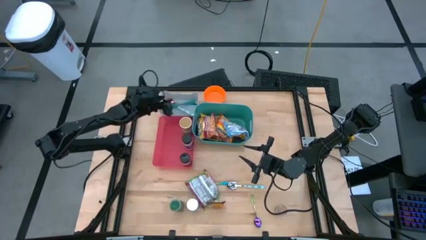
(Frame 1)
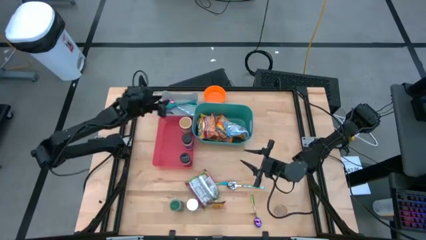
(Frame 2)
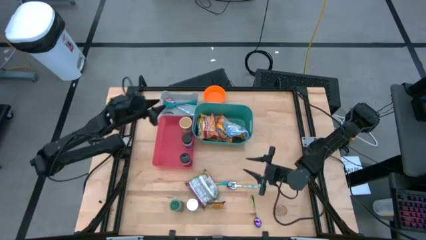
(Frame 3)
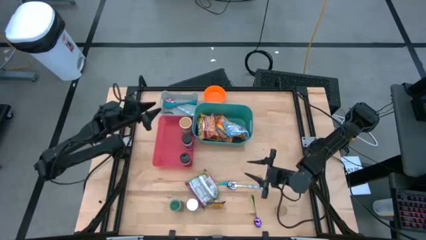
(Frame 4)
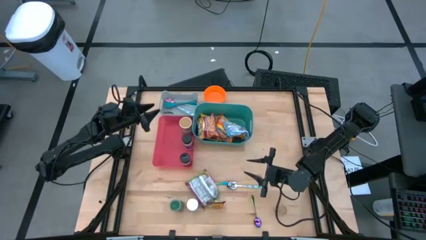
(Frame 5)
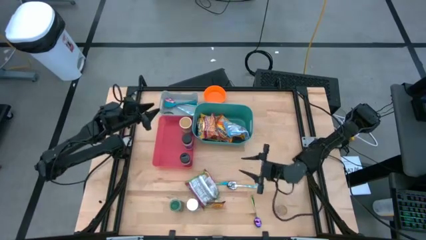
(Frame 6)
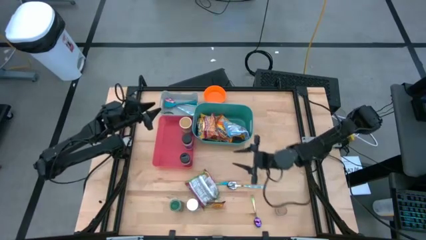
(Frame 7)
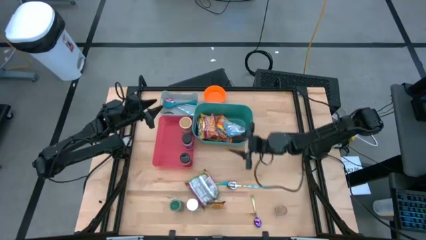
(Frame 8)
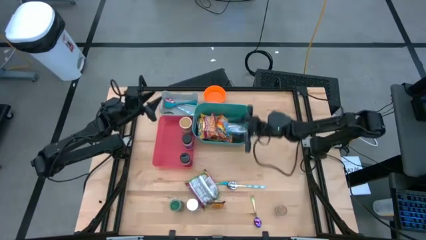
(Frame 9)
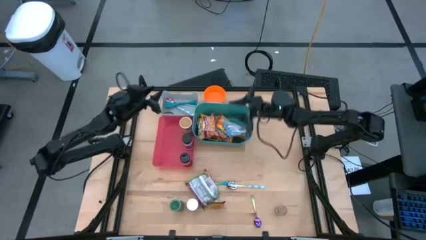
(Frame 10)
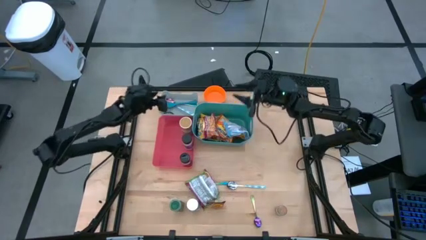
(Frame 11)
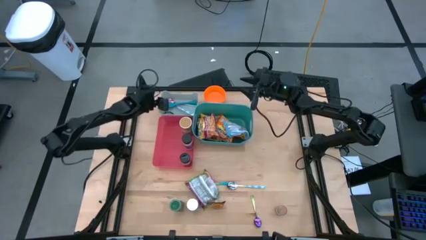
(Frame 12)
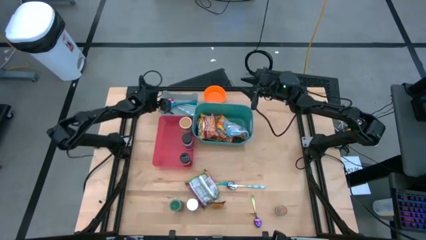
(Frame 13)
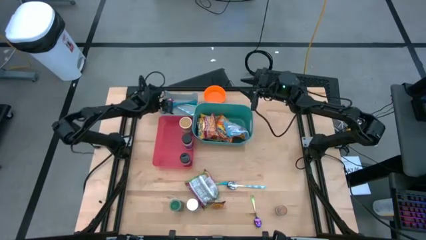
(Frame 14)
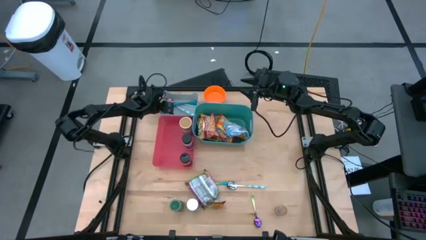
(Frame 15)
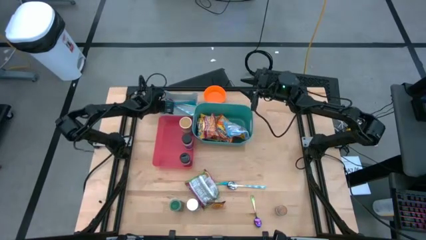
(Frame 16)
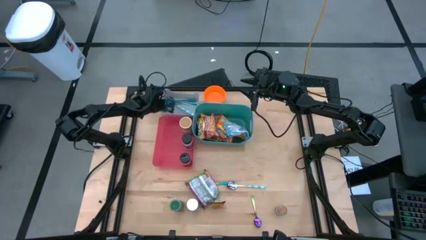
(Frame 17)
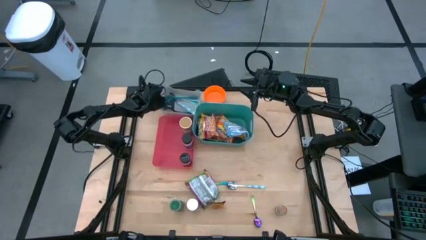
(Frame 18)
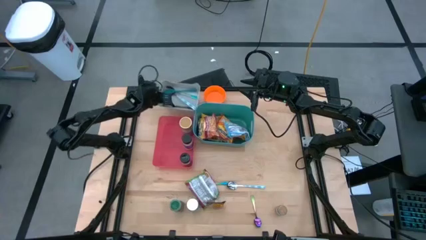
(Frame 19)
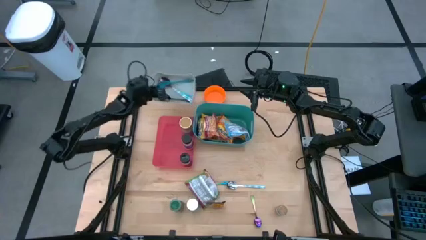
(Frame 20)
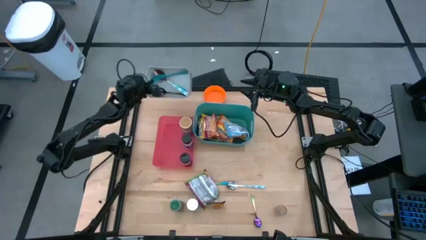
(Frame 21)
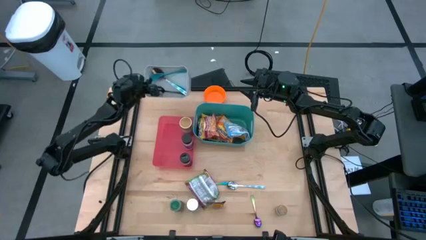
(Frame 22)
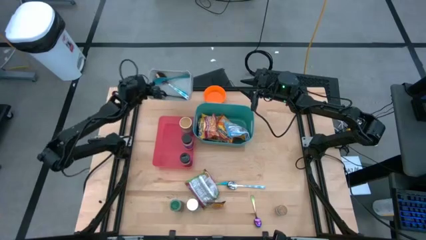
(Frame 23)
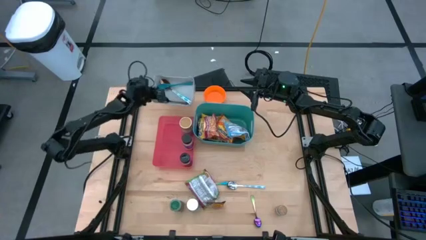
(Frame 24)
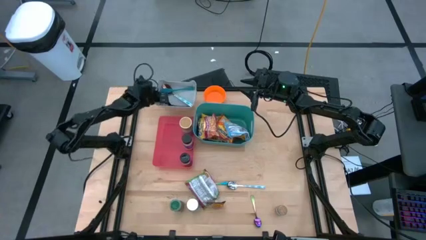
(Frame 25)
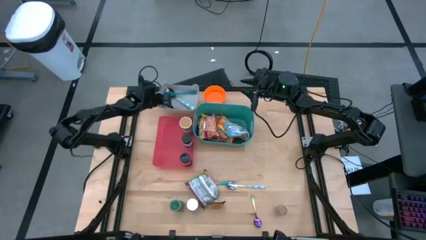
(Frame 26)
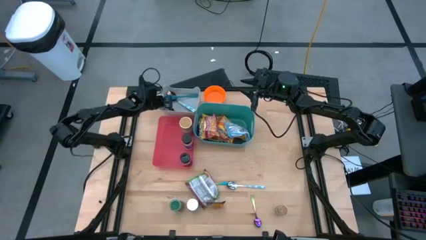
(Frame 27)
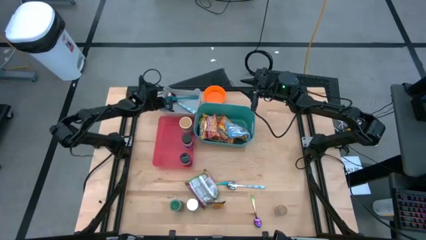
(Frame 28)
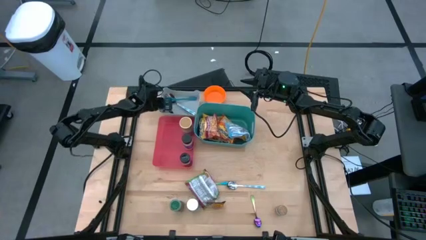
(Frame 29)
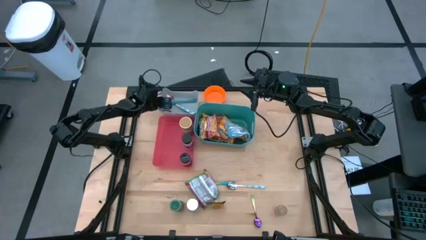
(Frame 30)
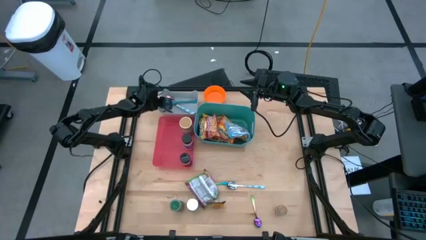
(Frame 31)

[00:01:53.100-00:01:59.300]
Task: Pick & Place Food Item
Adjust the gray bin

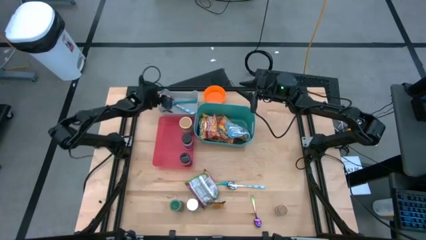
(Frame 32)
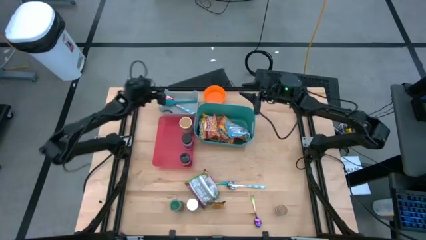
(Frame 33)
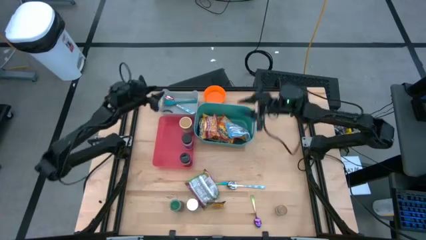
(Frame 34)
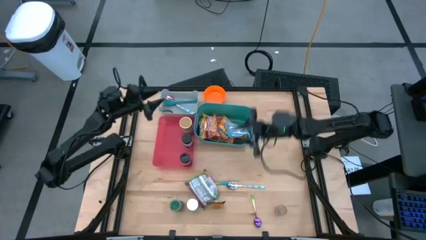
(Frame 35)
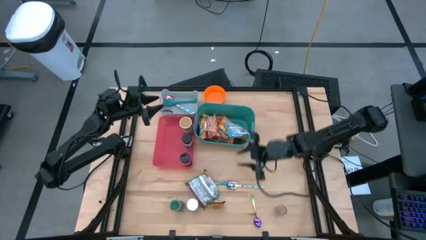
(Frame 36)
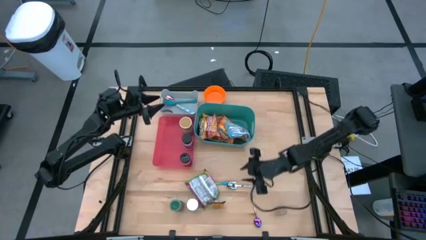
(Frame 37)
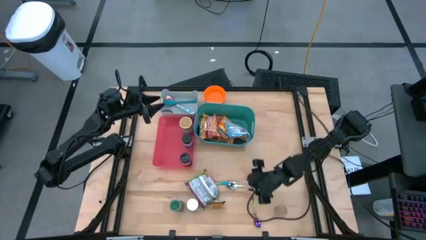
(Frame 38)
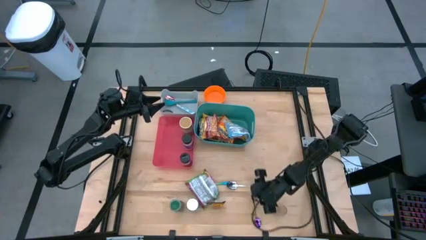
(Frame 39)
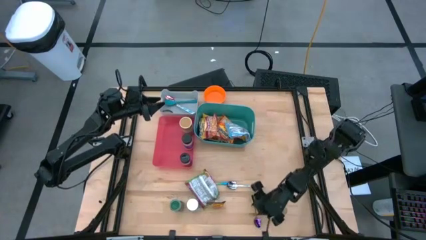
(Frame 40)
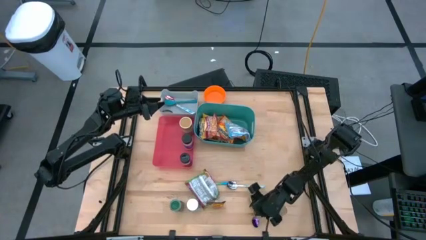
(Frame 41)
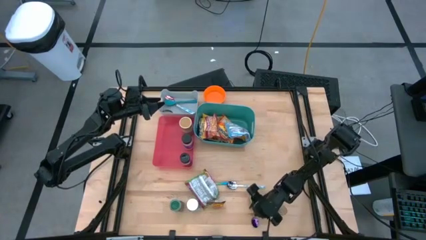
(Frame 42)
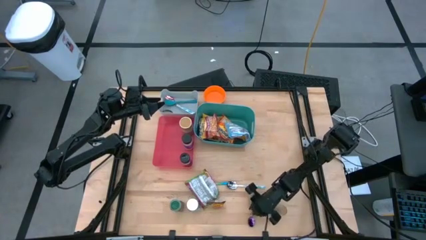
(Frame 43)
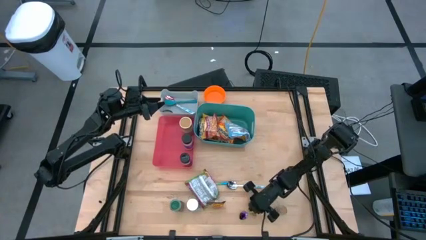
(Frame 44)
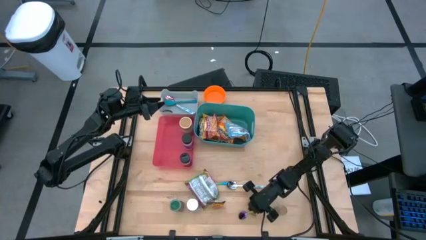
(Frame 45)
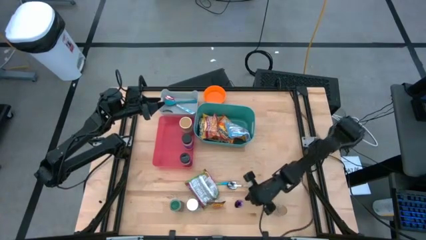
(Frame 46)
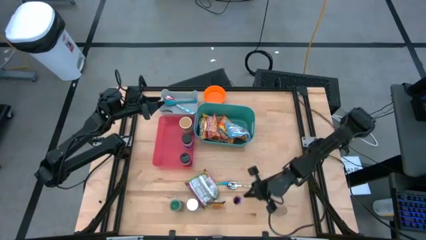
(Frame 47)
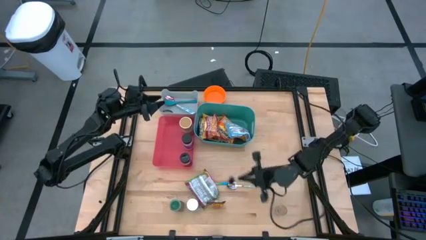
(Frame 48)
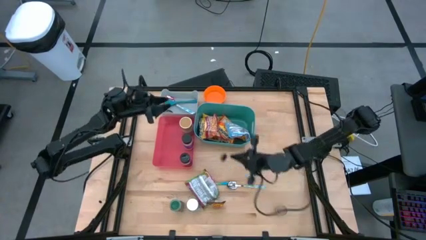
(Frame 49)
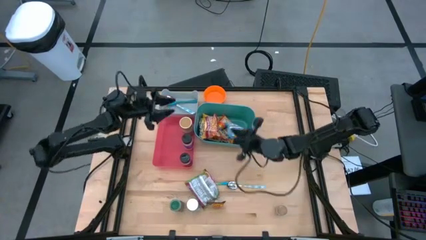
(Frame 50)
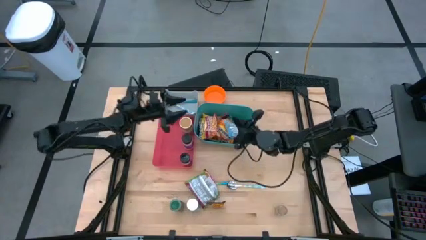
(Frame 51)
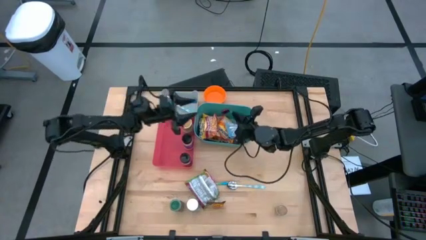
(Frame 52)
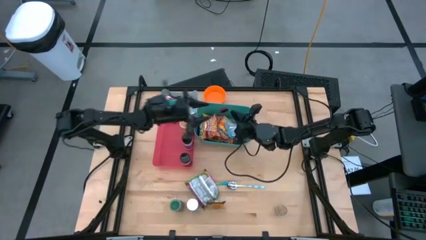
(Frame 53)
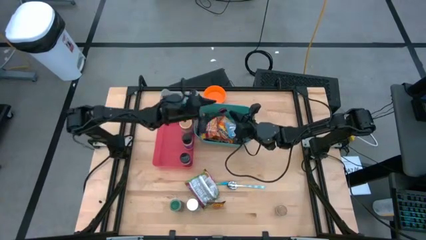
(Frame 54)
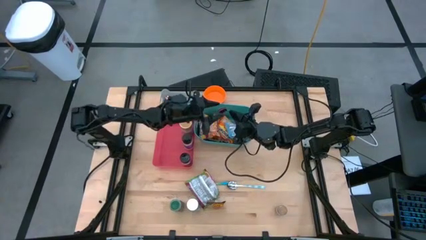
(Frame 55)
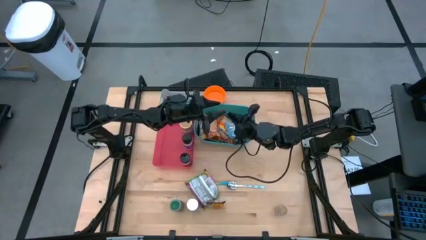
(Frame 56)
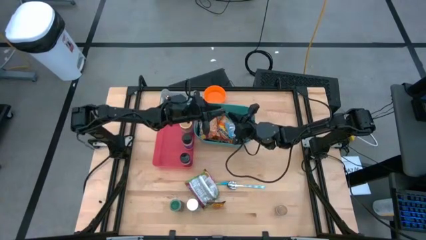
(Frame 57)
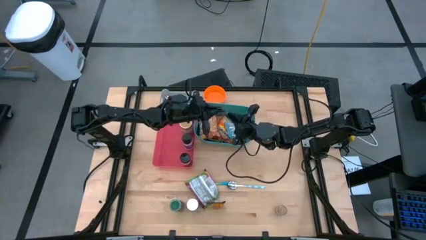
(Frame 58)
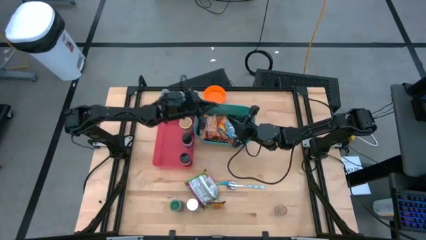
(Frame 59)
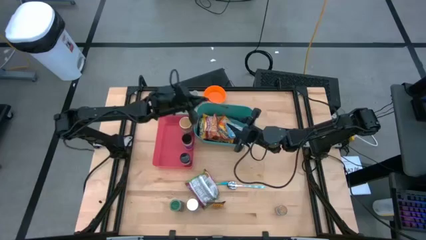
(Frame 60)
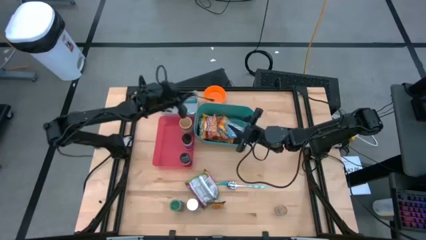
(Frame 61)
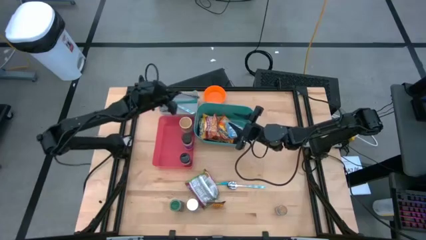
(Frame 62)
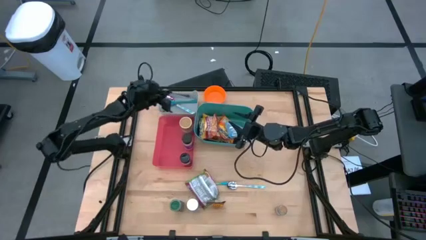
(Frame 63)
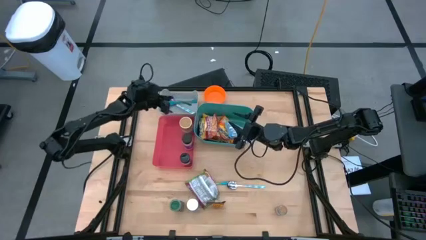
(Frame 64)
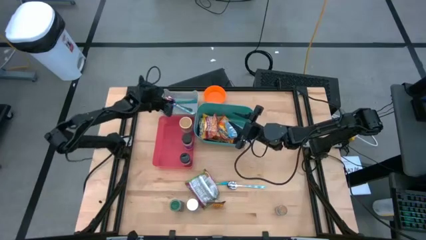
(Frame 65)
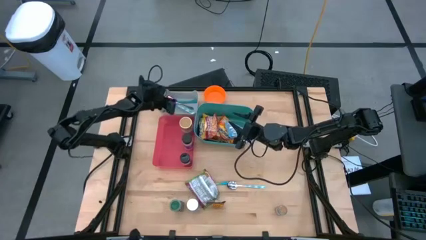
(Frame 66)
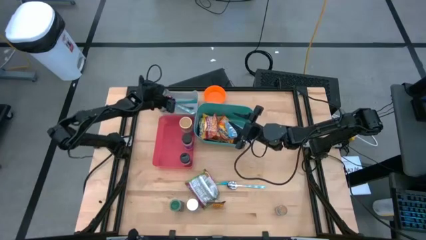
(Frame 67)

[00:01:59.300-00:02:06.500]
Put the violet spoon into the gray bin

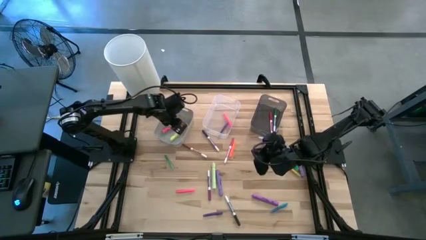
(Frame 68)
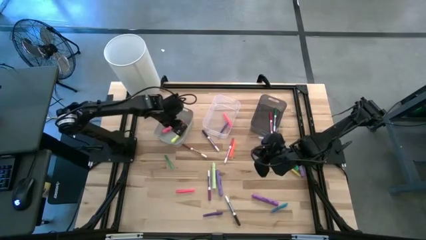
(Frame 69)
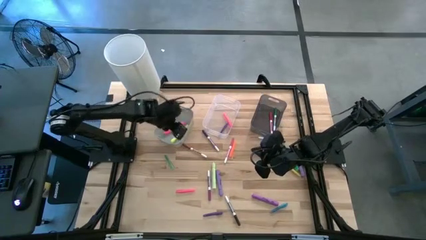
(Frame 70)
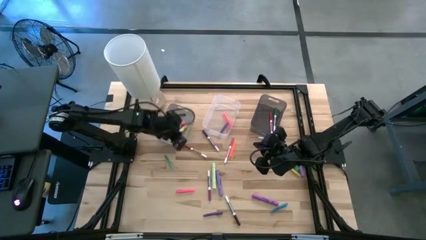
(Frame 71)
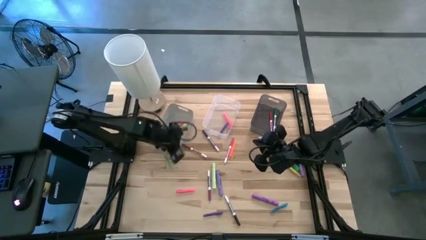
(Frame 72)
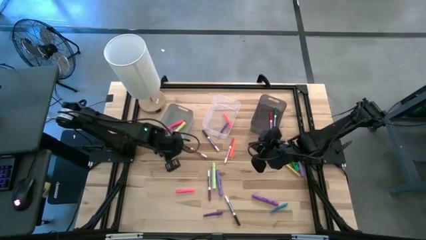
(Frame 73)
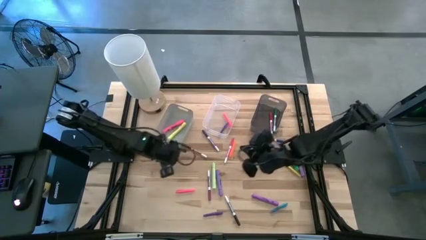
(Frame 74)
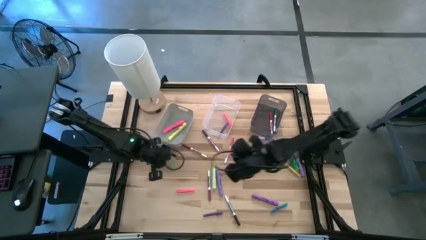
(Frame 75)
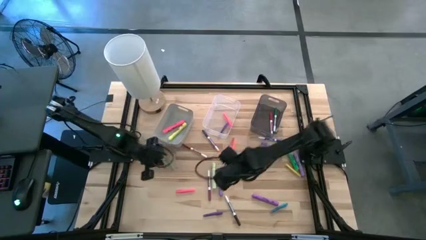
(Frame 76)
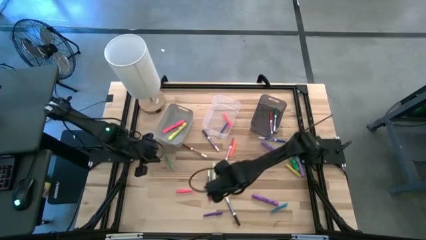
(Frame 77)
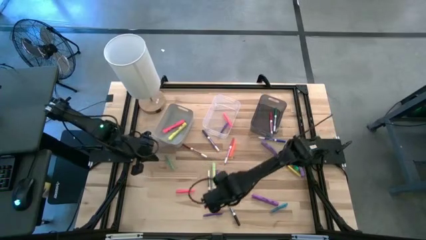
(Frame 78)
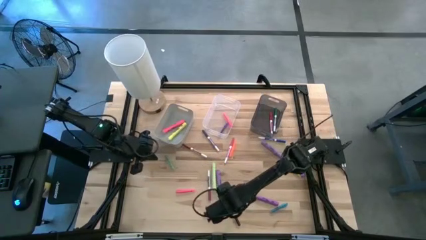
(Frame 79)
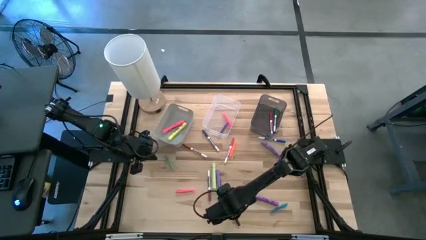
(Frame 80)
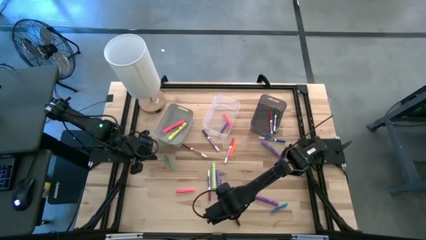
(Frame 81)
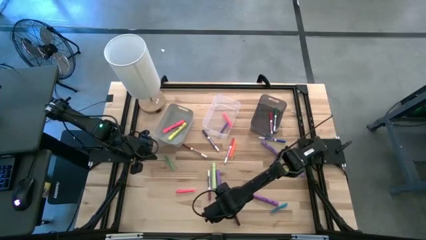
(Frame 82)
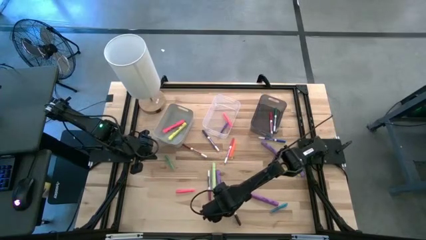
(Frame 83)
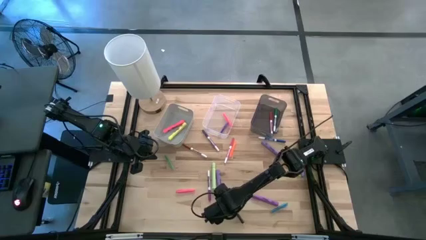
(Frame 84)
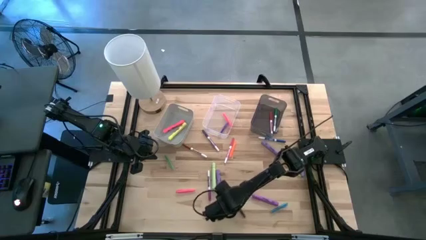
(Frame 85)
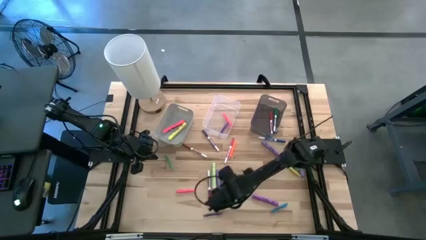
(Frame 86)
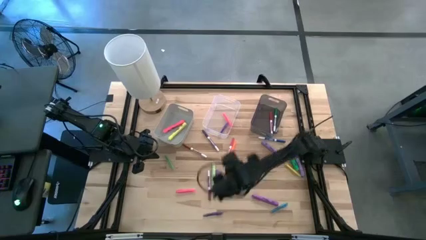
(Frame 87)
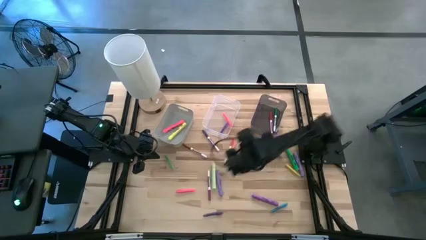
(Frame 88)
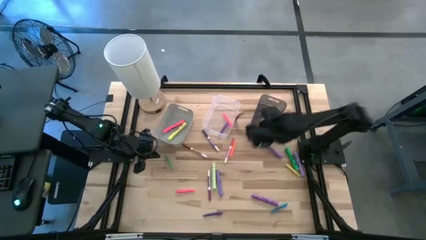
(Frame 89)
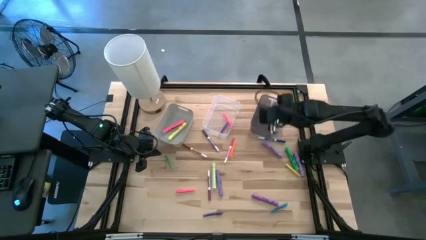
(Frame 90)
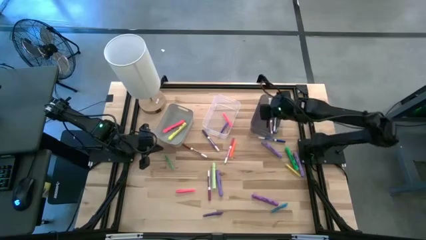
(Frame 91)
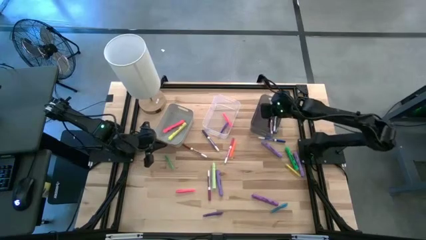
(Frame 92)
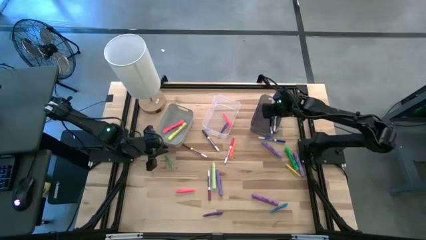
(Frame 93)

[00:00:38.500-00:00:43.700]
Task: Pick & Place Markers
Put the black marker into the black bin
